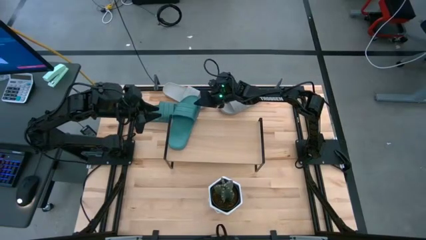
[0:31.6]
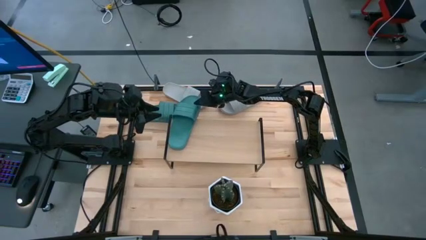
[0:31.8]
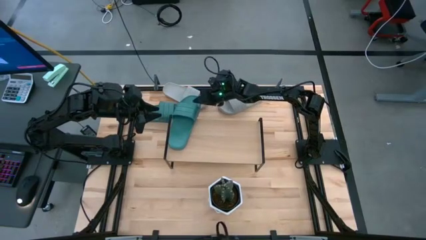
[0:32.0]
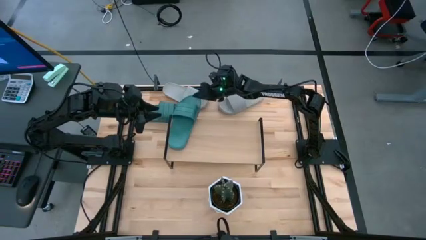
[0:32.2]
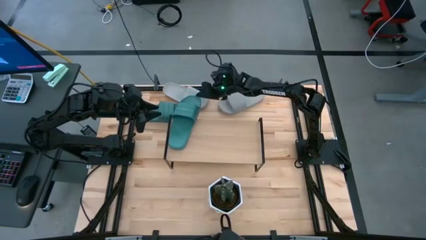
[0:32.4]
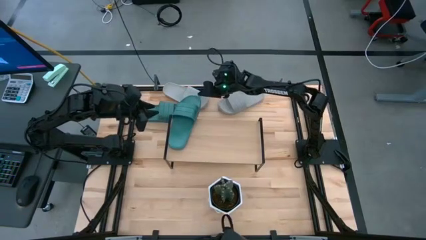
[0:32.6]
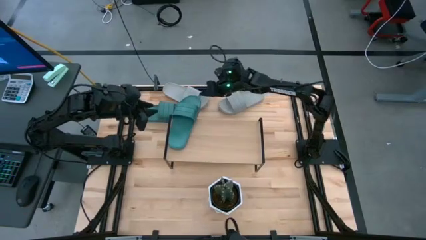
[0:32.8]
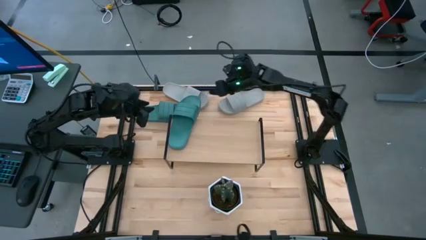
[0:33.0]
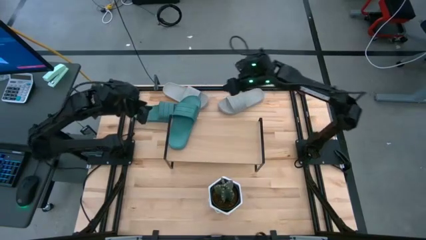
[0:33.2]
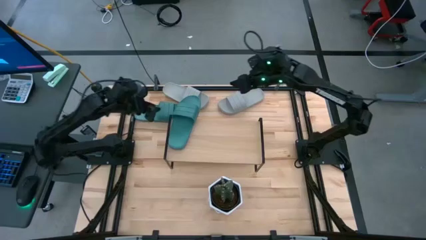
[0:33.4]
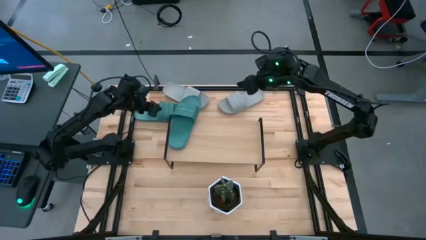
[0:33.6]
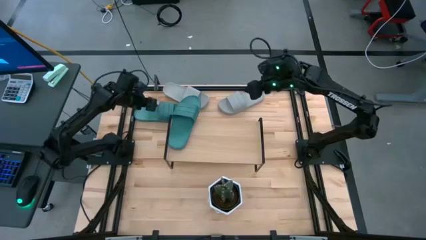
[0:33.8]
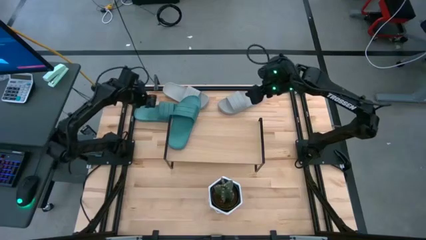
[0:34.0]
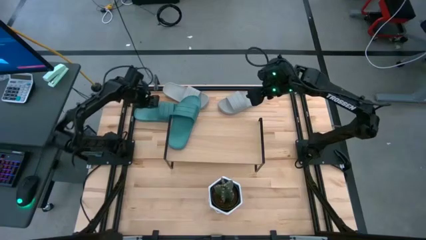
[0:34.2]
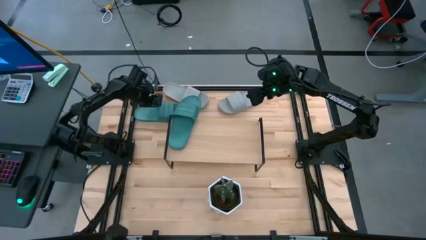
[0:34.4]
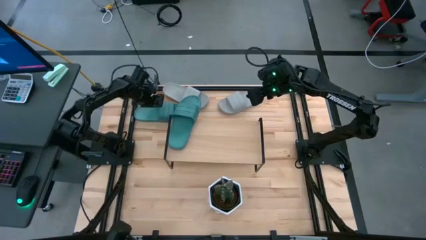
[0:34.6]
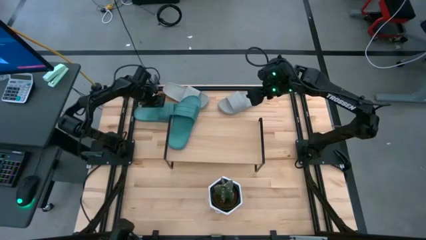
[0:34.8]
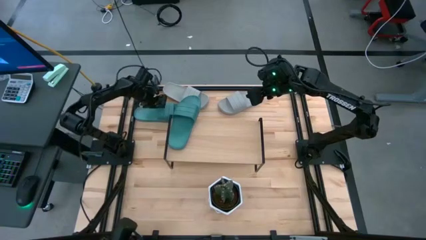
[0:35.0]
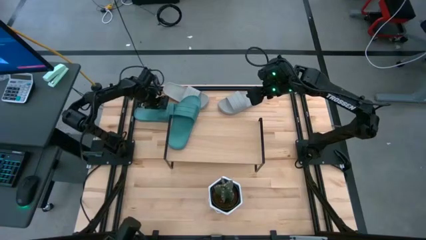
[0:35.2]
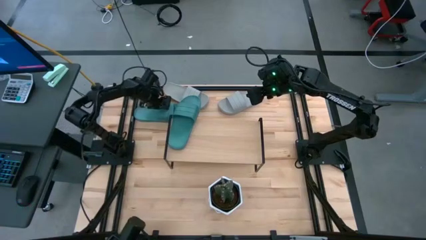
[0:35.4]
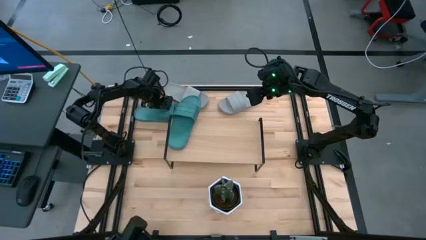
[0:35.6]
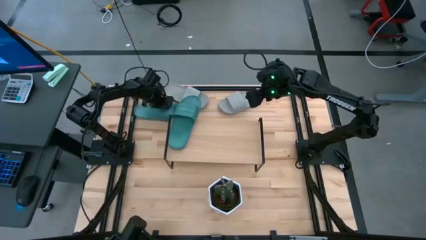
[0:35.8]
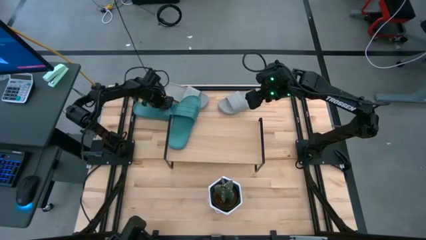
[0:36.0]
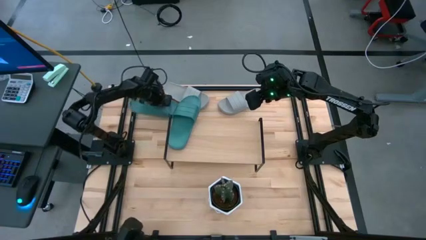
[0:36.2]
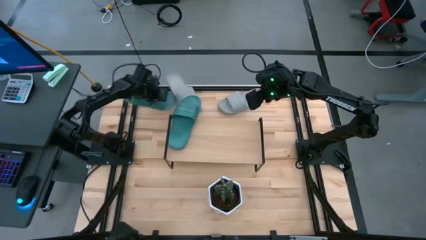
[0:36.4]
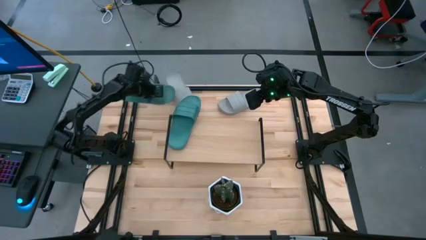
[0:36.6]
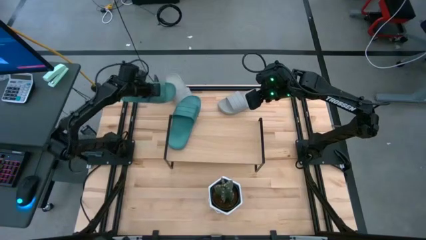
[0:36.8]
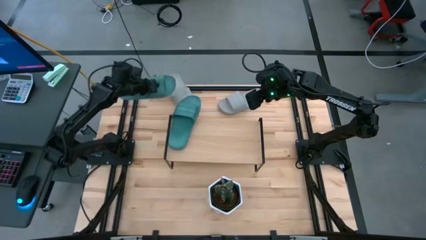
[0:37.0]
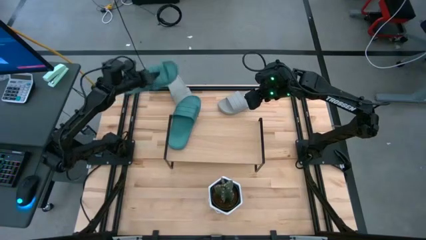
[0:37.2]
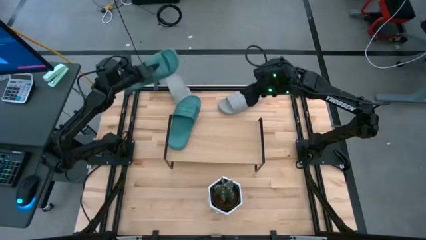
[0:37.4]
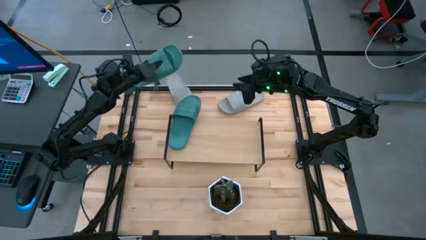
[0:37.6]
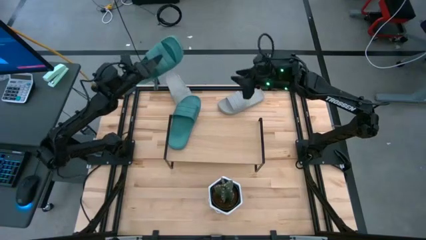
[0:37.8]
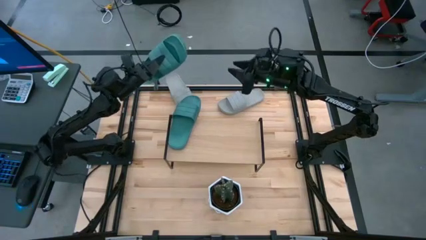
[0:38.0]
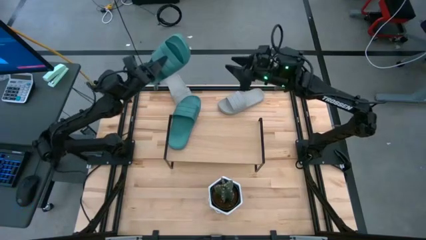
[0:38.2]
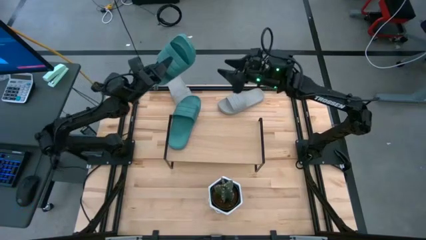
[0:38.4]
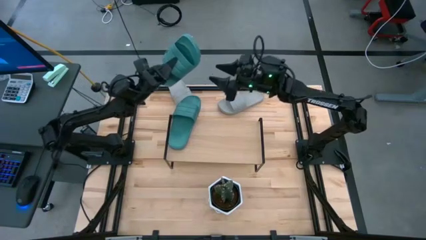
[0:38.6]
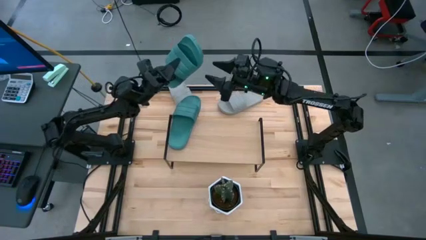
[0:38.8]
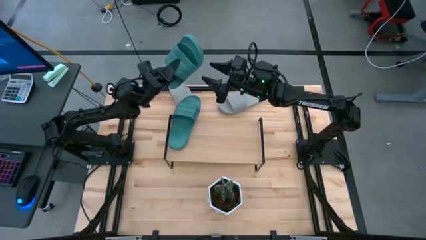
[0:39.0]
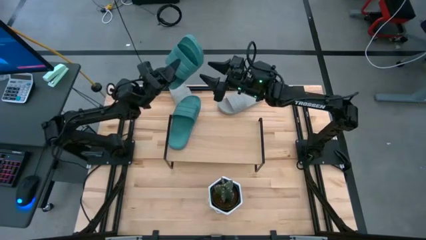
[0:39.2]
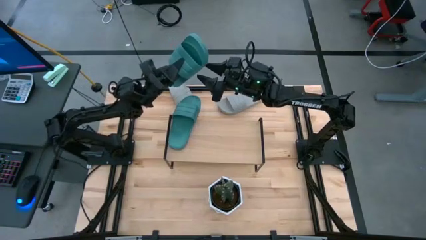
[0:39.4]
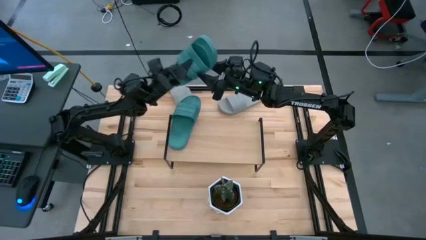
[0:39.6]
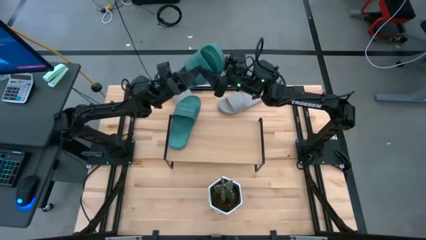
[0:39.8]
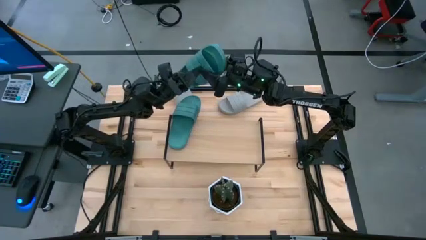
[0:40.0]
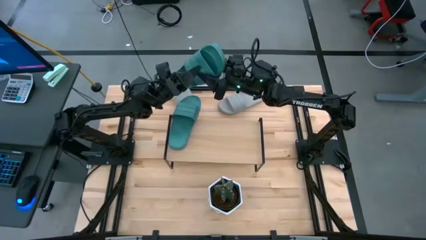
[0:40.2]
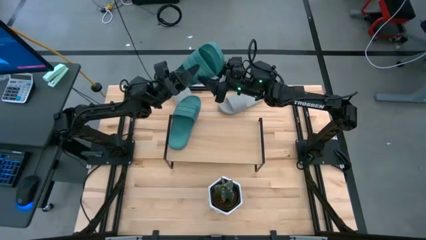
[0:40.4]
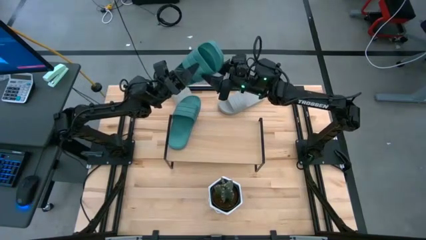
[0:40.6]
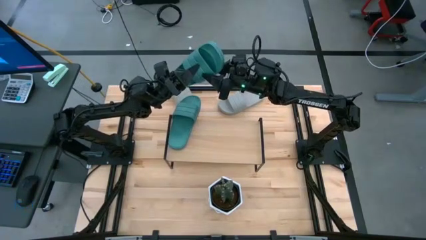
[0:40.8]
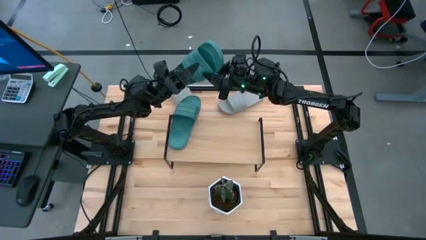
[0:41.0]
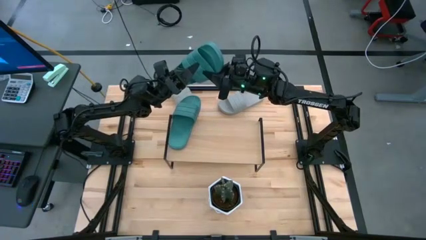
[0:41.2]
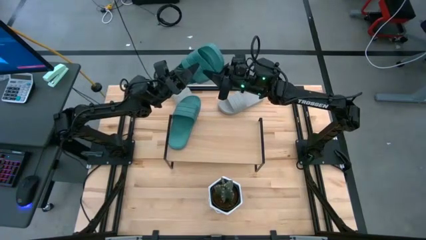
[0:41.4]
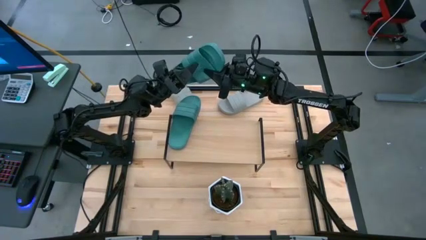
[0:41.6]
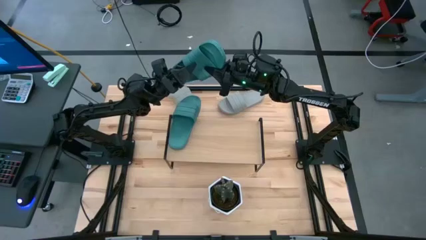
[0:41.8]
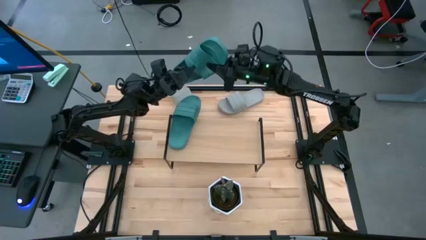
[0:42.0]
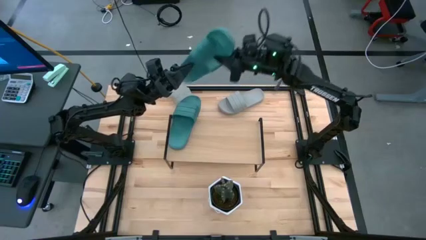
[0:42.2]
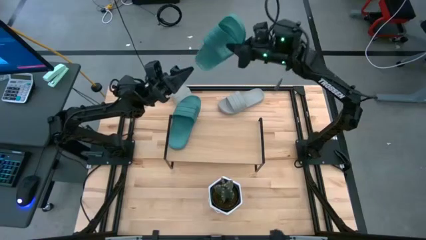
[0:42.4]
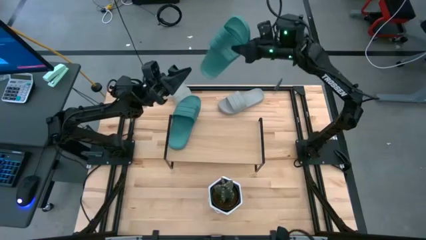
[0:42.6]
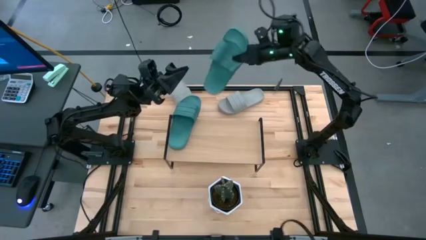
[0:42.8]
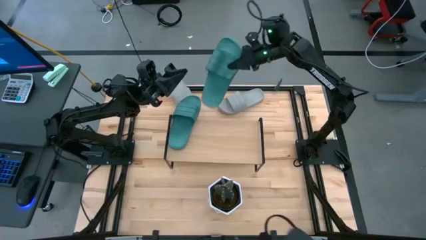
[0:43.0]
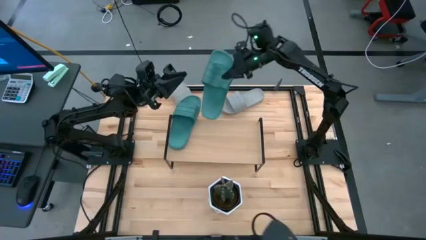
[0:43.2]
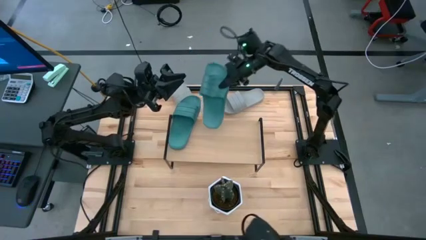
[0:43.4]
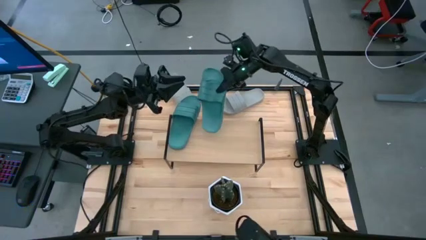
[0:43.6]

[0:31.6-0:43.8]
Task: Pick and place slides into the shelf
Put the green slipper on the shelf
